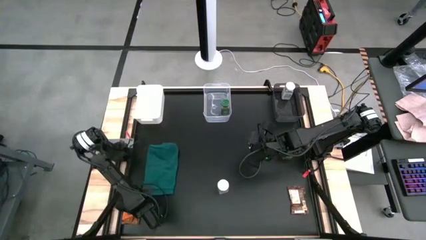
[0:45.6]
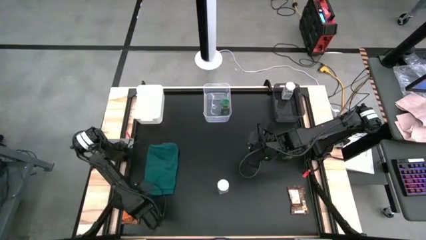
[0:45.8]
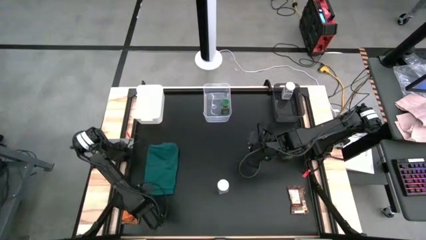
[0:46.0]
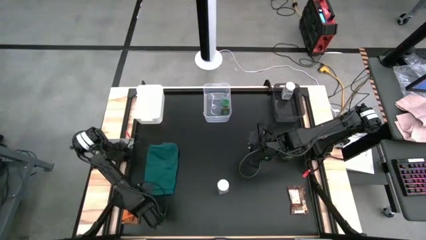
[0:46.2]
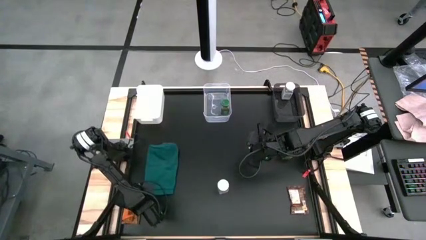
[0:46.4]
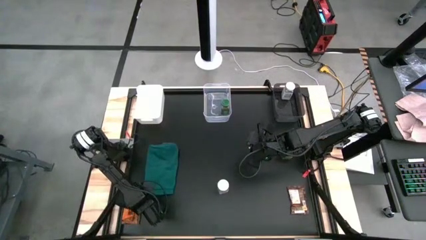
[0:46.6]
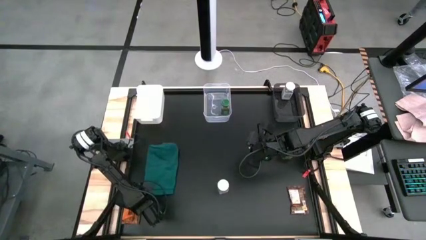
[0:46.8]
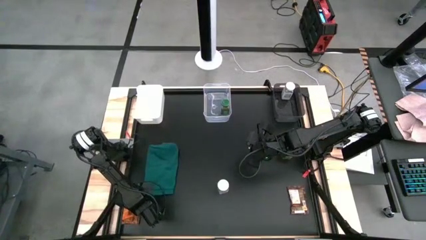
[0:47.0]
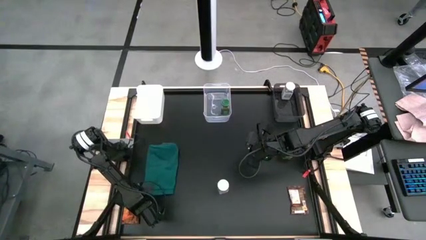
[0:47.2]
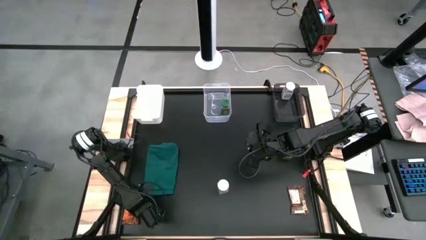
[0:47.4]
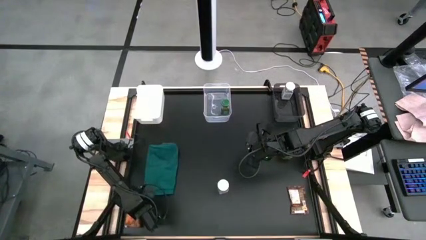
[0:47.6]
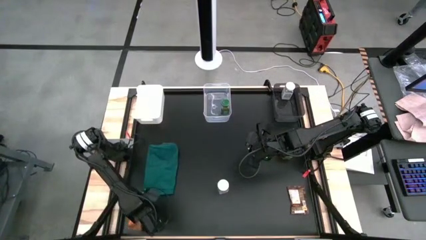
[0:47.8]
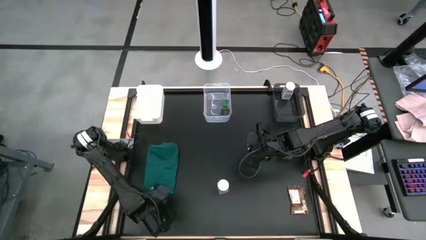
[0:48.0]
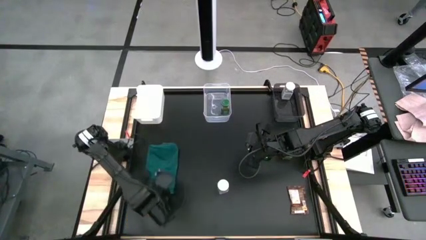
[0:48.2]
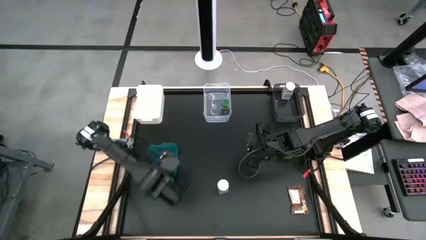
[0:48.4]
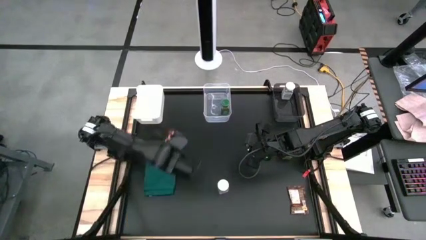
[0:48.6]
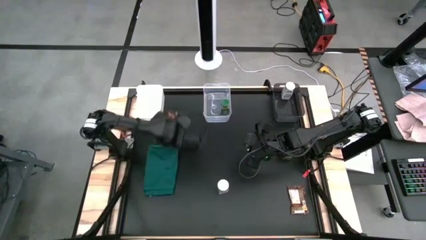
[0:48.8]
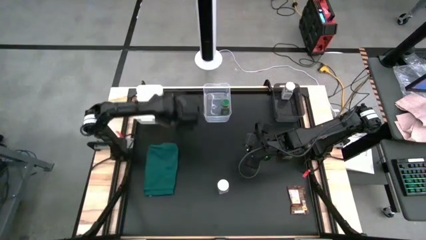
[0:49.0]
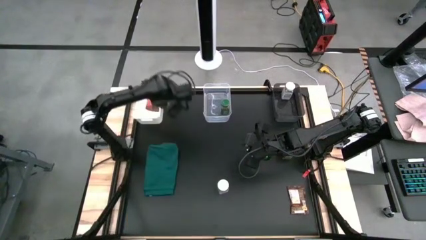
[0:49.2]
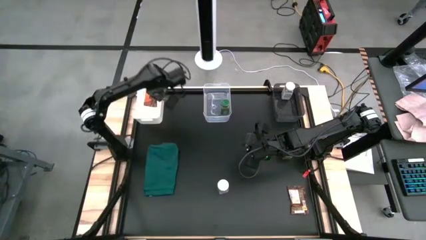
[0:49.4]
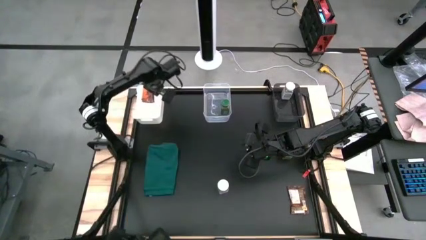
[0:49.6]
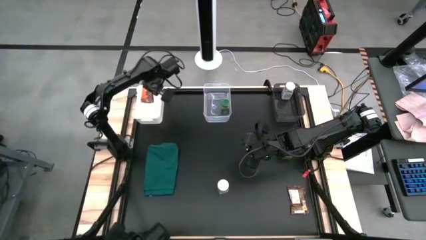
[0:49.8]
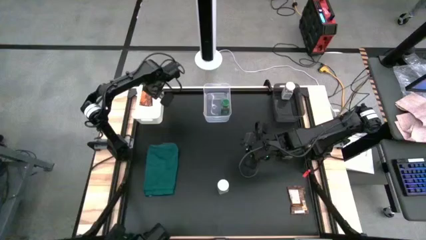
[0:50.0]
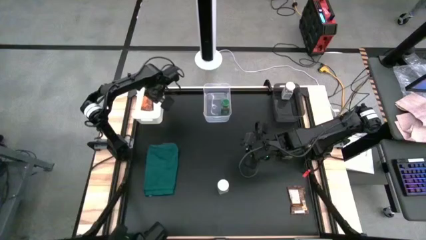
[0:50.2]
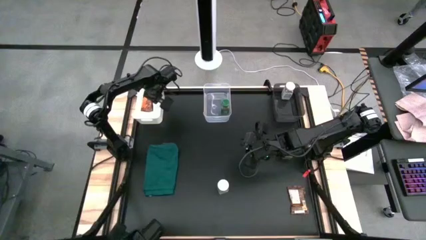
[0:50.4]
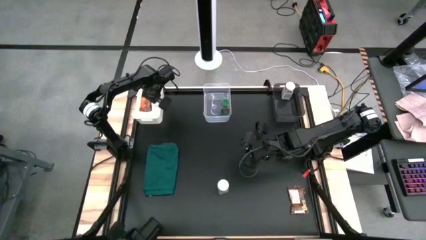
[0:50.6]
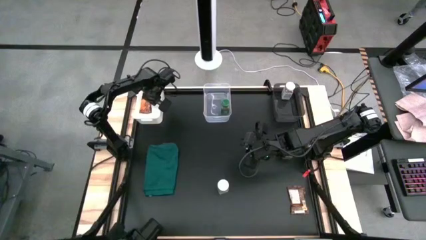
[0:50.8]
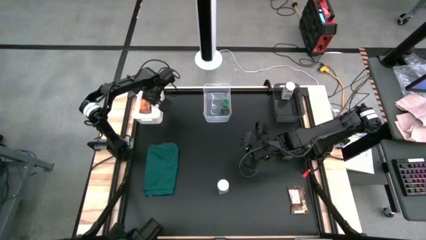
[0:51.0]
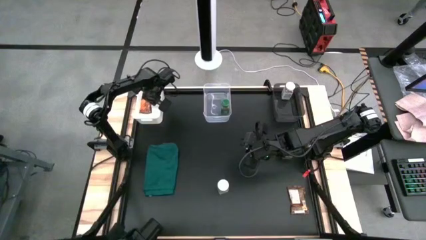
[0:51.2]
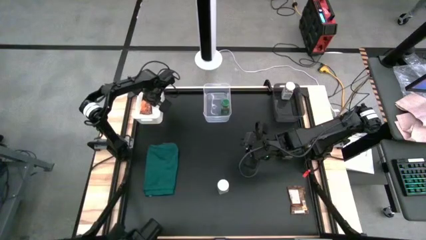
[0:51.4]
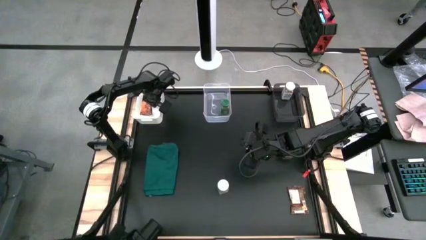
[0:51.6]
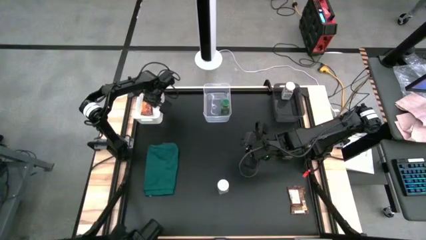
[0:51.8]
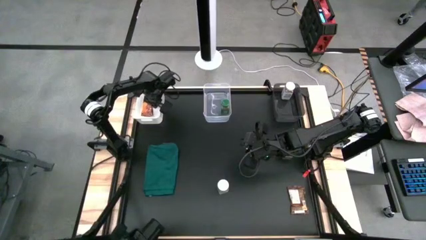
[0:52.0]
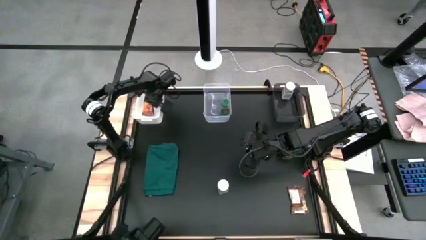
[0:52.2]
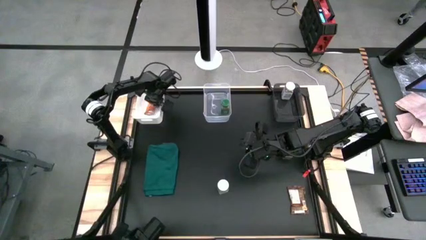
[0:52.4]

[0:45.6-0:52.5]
Task: Sort spices by type
Put the left orange seasoning pack into the white bin

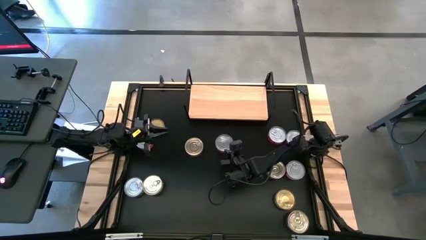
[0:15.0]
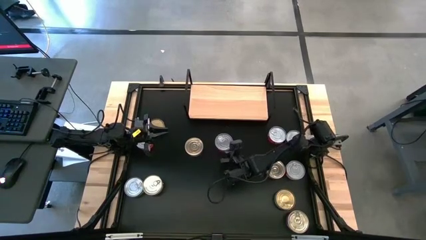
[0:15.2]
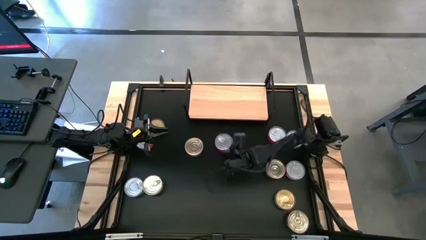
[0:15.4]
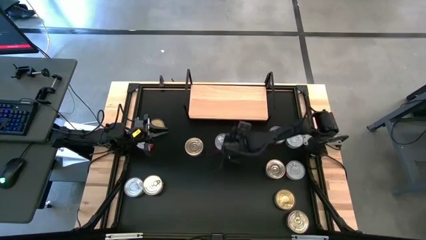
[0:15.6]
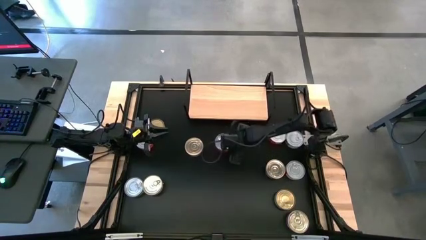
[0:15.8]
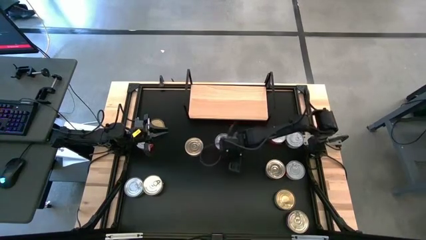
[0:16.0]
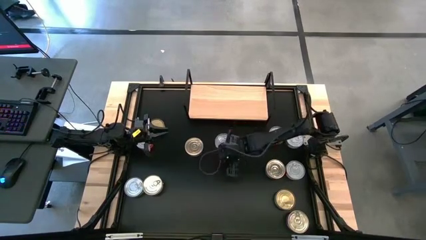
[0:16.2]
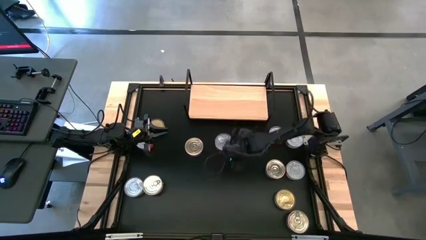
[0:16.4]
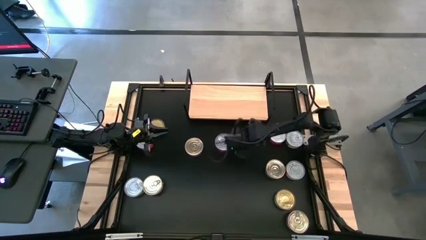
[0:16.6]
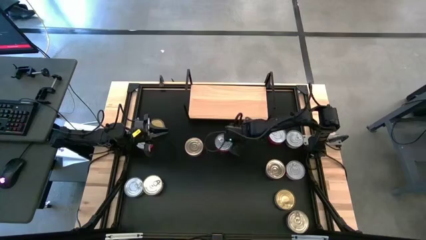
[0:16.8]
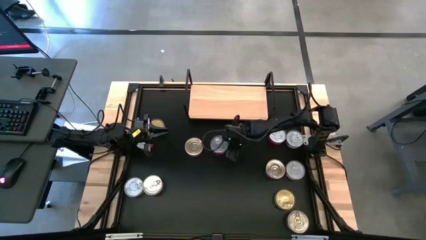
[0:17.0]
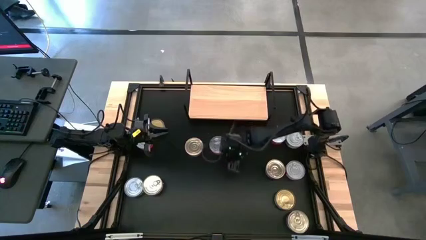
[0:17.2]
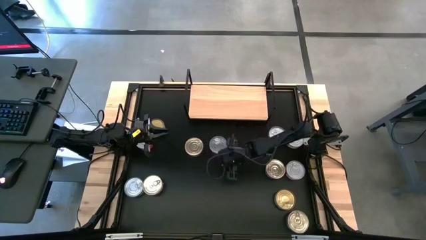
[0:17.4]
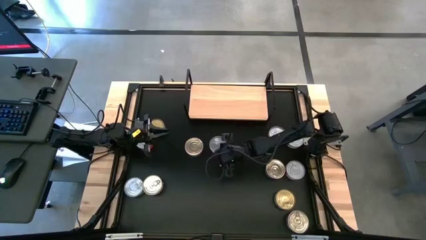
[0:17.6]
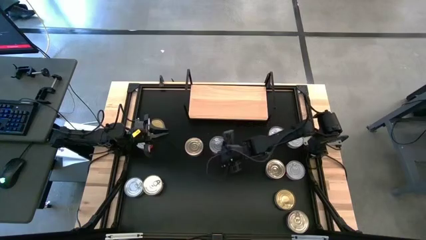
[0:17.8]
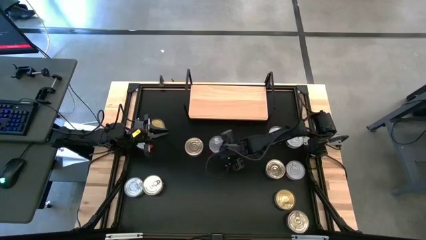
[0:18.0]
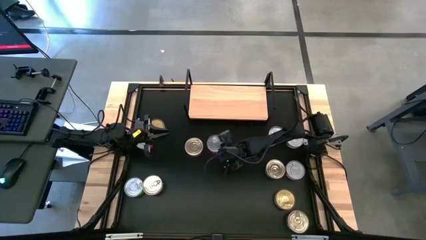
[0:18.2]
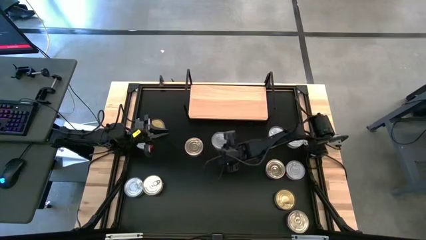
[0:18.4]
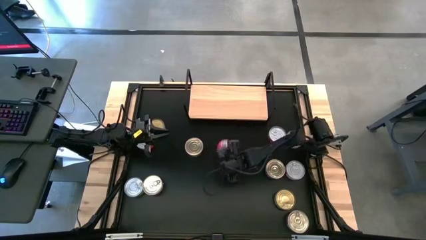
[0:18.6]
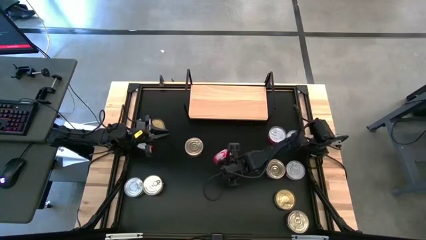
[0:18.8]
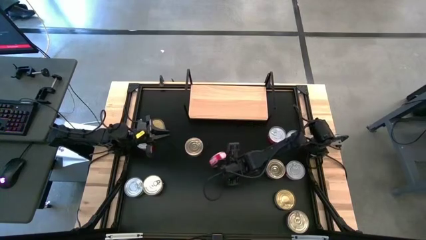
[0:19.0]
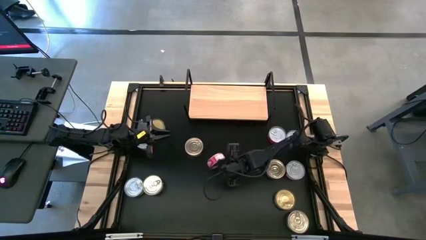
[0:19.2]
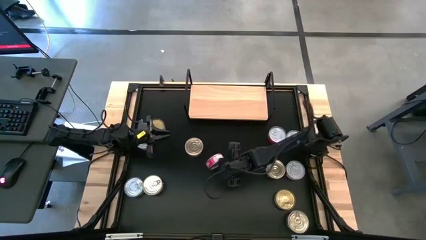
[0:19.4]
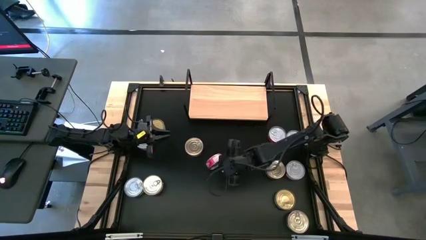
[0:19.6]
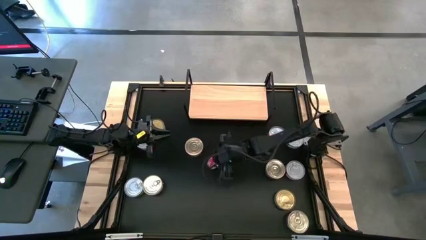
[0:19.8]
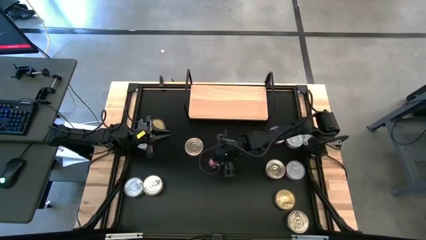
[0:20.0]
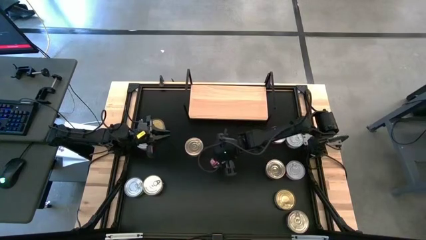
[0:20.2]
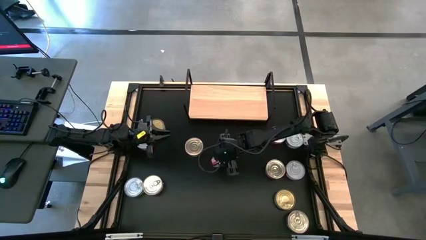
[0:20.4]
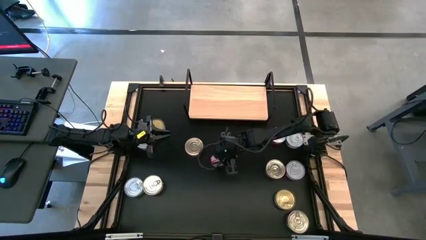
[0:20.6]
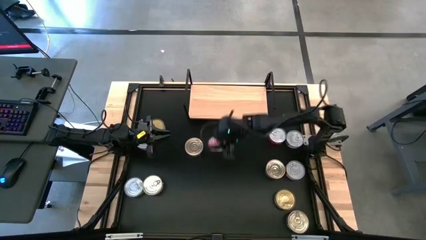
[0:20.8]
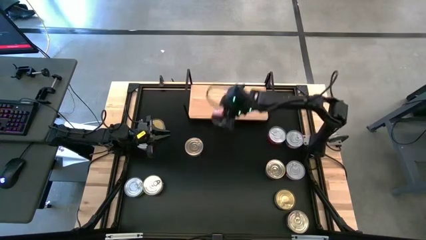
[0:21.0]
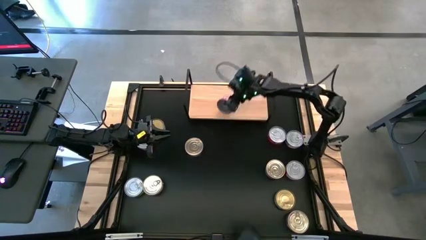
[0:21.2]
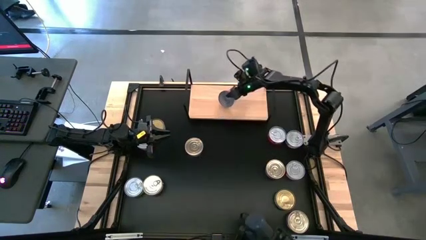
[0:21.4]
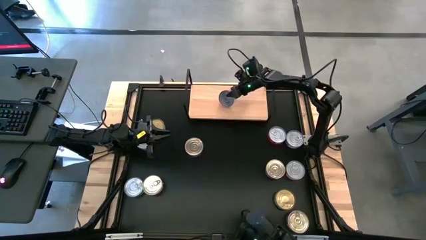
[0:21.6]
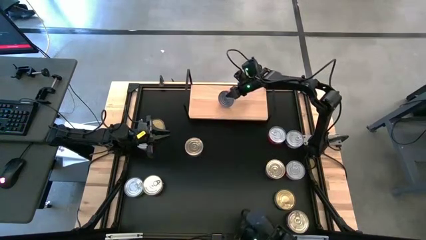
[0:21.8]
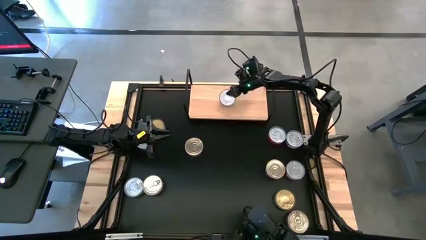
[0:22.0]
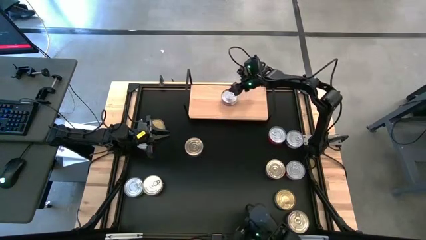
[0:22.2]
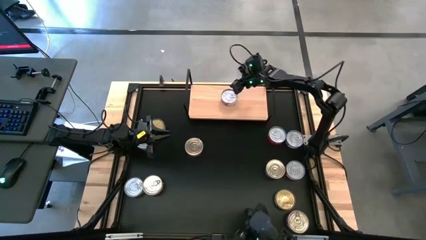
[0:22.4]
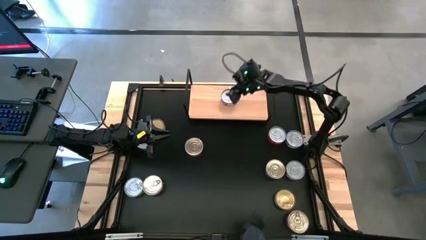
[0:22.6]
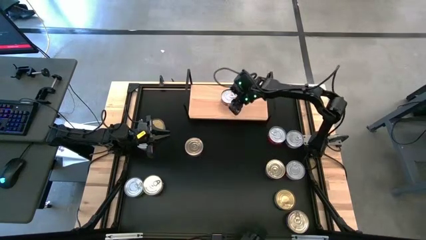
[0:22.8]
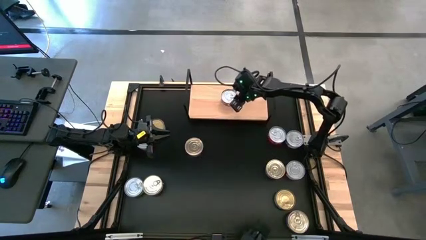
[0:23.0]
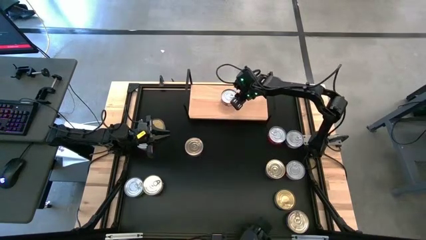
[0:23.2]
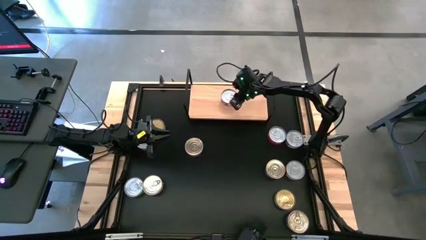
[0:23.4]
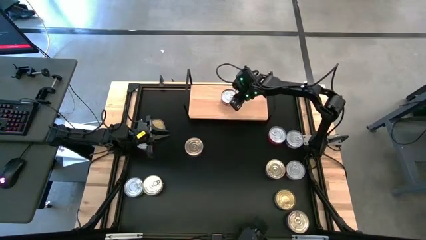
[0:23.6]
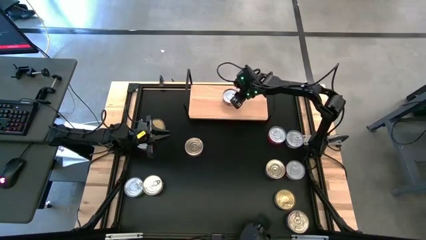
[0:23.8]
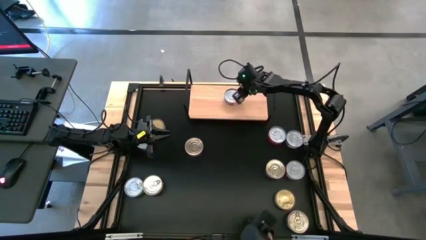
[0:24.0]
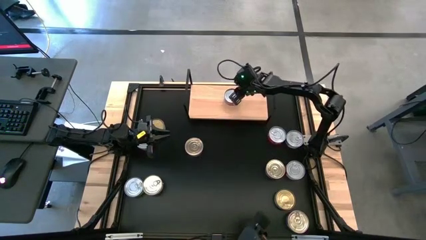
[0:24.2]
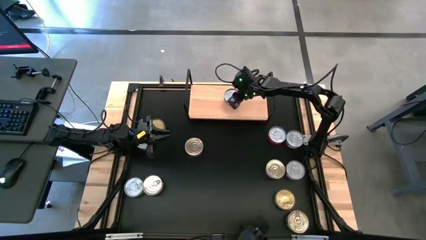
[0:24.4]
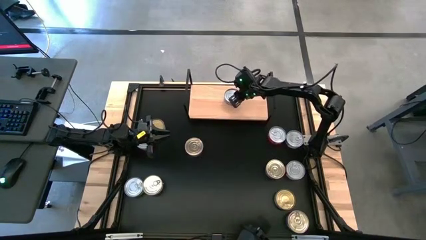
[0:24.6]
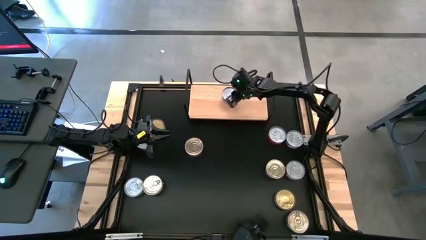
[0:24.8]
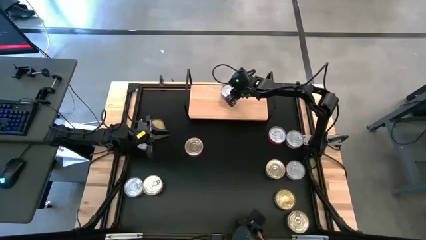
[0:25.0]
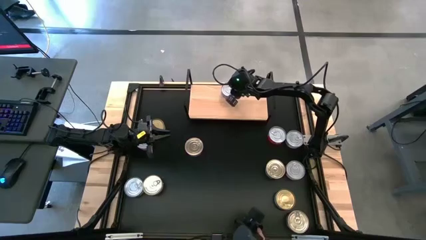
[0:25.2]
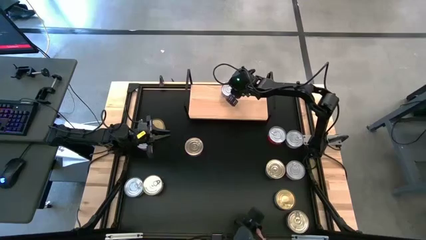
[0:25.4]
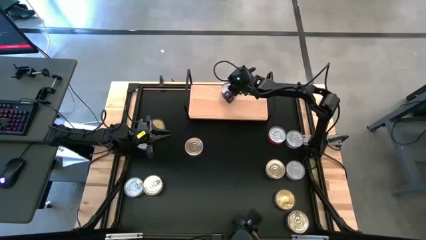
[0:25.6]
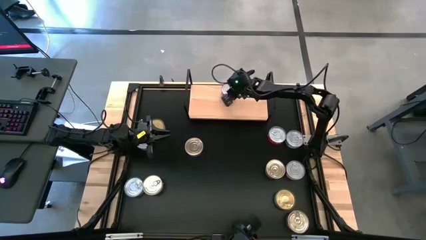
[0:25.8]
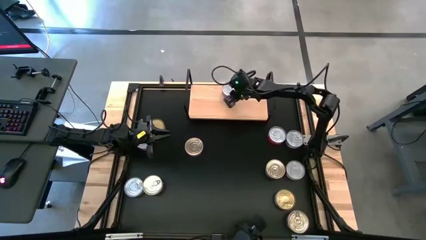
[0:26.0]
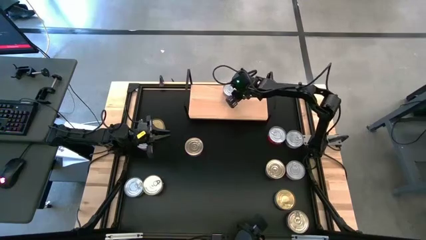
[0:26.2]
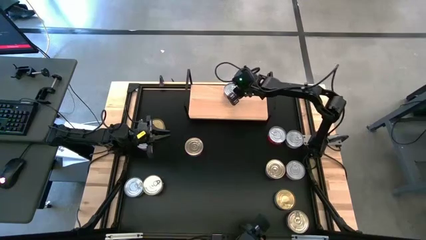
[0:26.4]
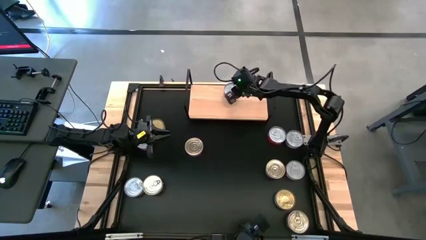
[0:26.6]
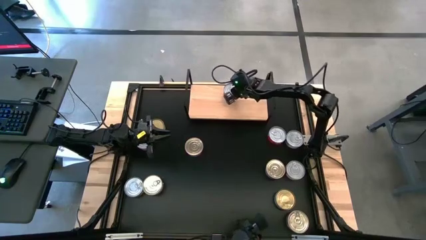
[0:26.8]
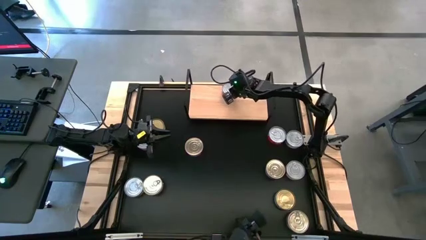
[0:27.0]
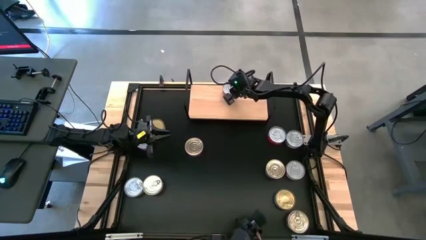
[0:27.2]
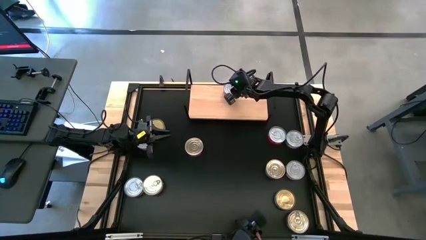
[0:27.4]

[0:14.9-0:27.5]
Task: Stack canned seafood by type on shelf
Put the red tuna can on the shelf
